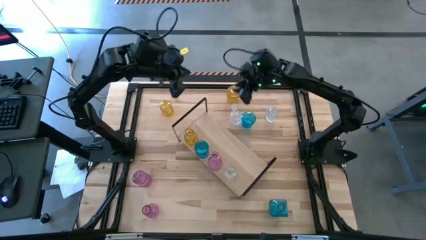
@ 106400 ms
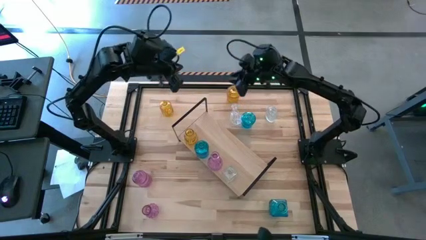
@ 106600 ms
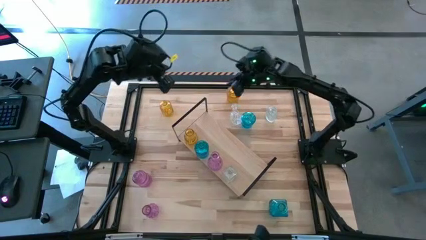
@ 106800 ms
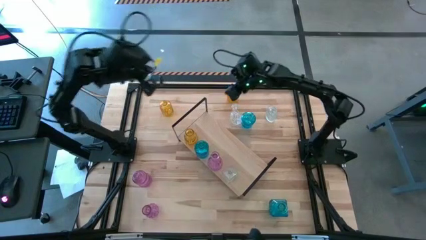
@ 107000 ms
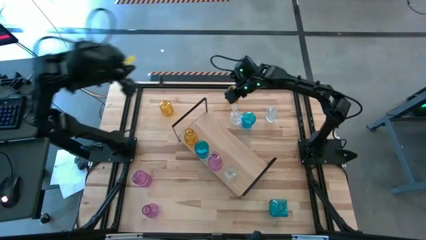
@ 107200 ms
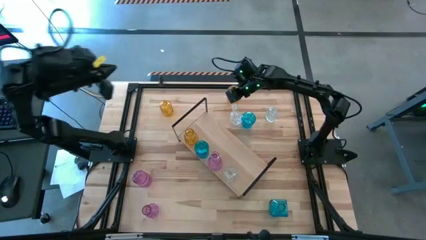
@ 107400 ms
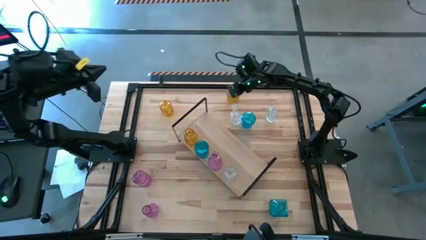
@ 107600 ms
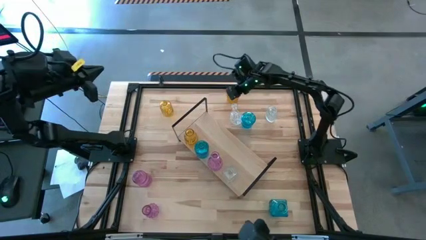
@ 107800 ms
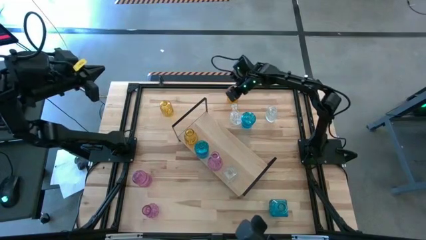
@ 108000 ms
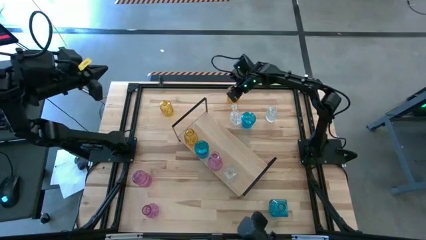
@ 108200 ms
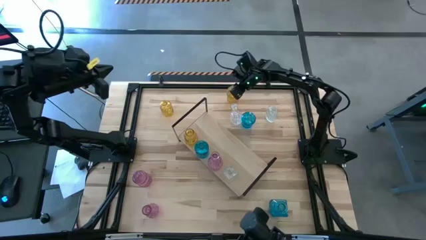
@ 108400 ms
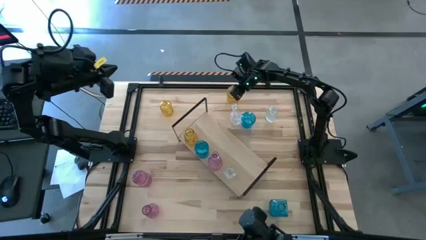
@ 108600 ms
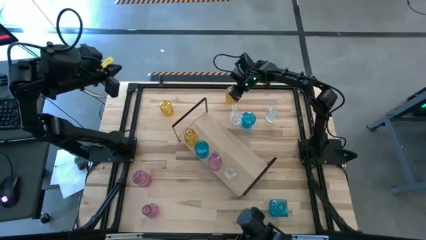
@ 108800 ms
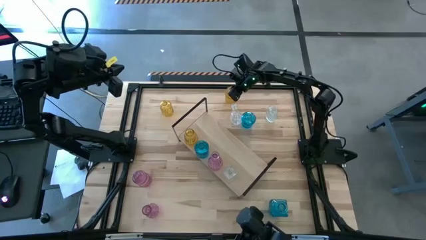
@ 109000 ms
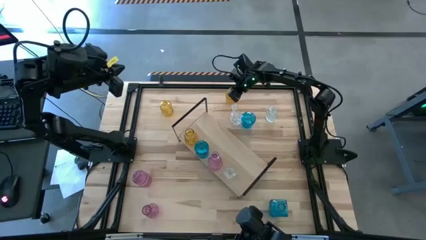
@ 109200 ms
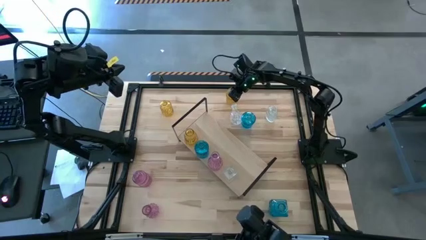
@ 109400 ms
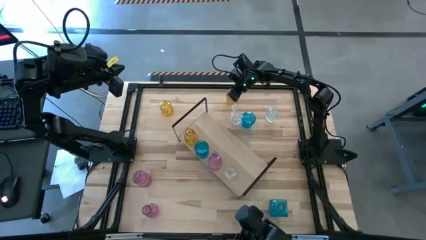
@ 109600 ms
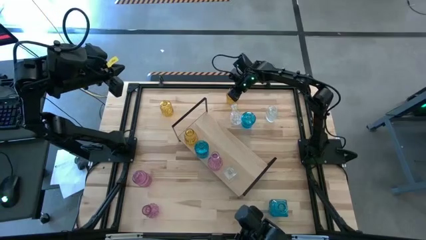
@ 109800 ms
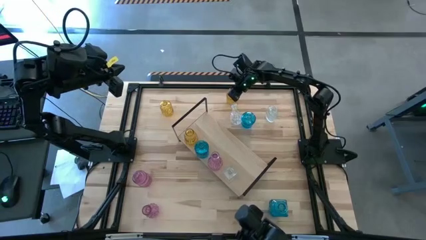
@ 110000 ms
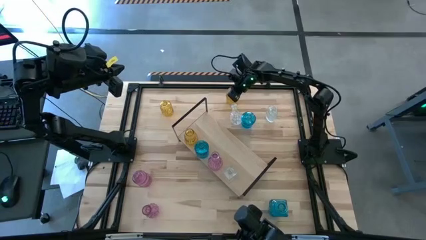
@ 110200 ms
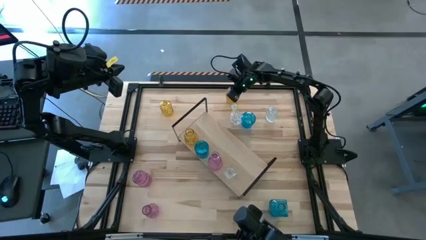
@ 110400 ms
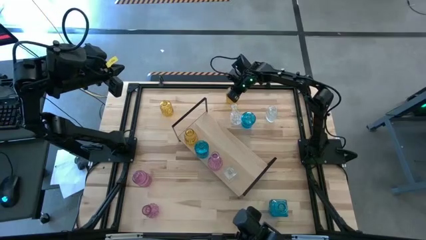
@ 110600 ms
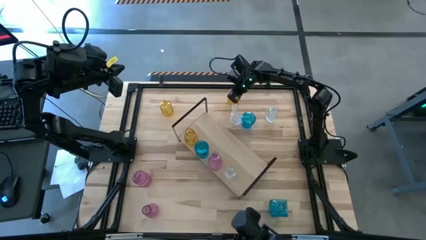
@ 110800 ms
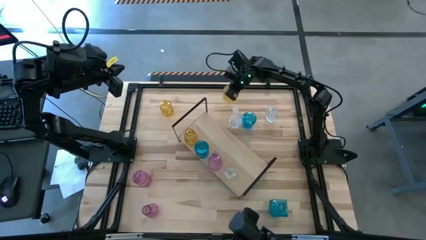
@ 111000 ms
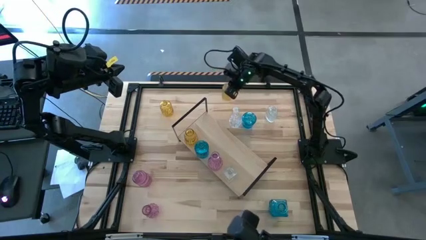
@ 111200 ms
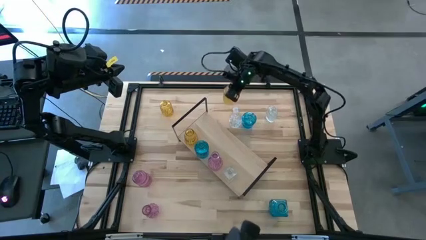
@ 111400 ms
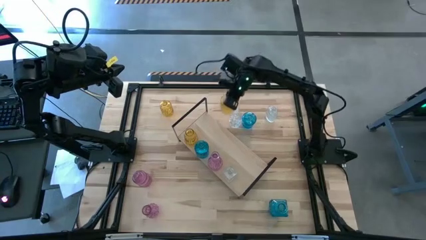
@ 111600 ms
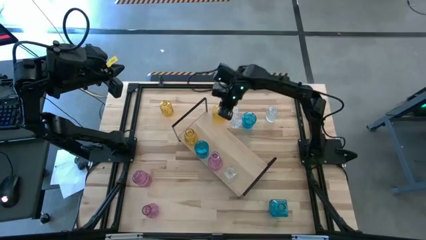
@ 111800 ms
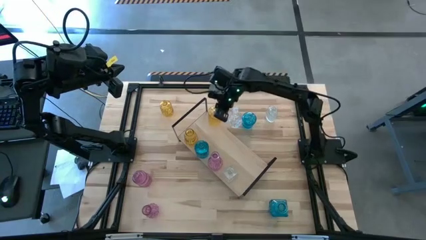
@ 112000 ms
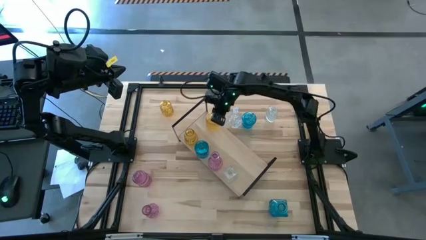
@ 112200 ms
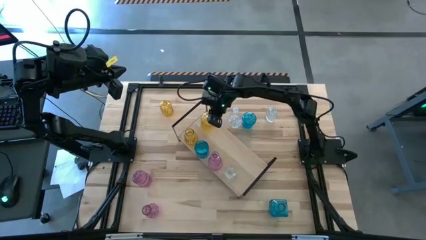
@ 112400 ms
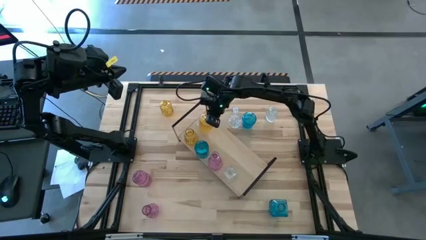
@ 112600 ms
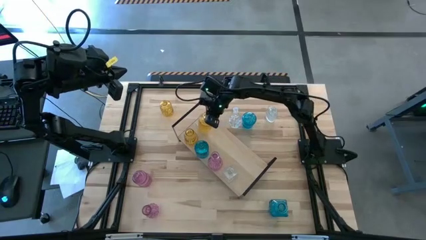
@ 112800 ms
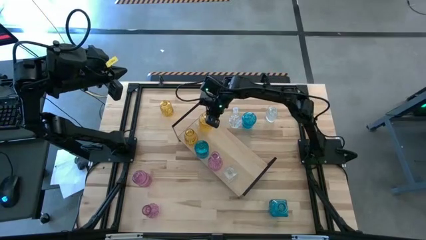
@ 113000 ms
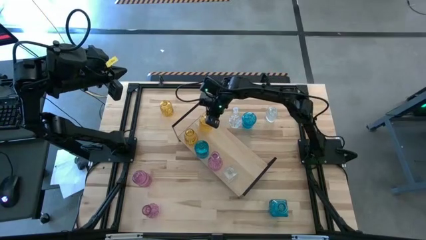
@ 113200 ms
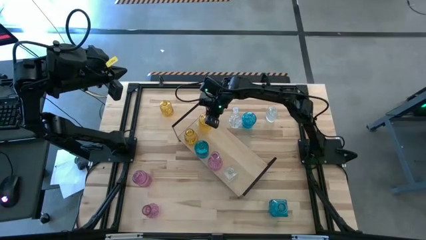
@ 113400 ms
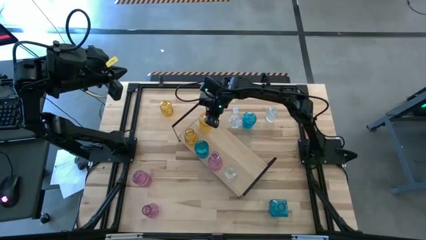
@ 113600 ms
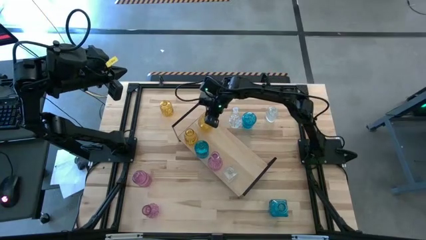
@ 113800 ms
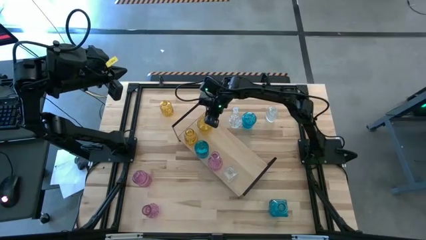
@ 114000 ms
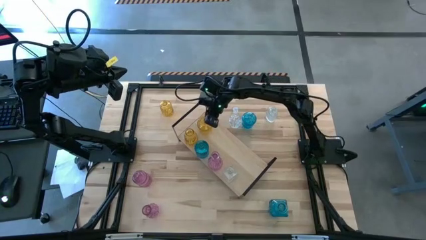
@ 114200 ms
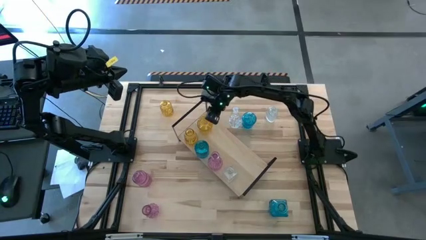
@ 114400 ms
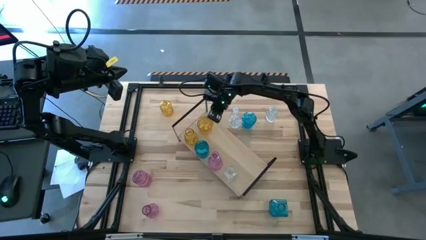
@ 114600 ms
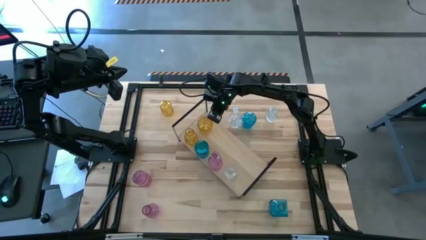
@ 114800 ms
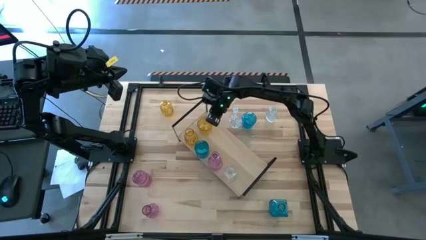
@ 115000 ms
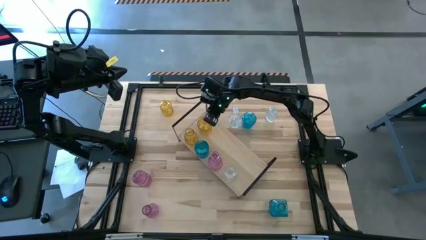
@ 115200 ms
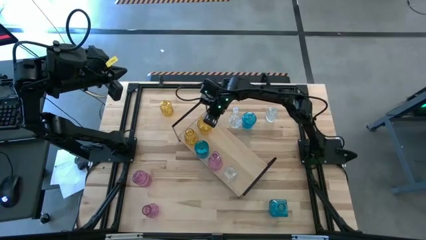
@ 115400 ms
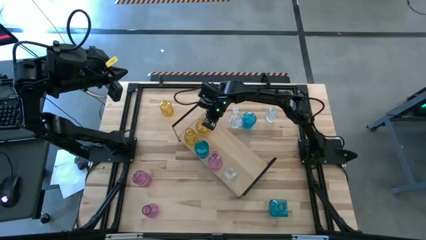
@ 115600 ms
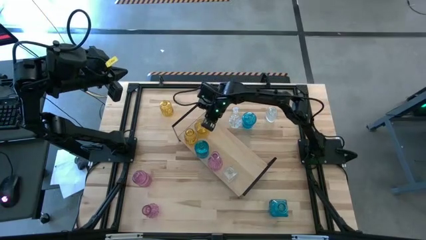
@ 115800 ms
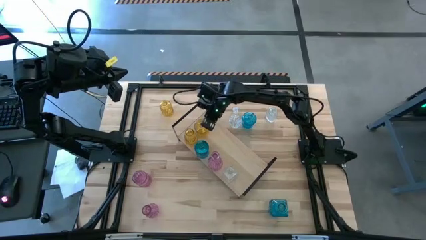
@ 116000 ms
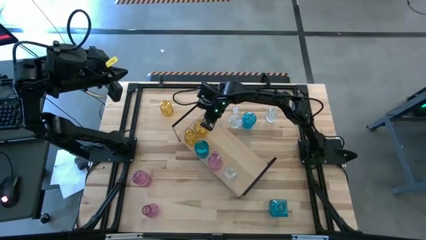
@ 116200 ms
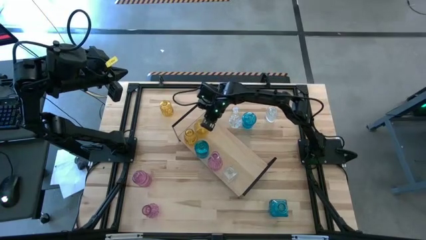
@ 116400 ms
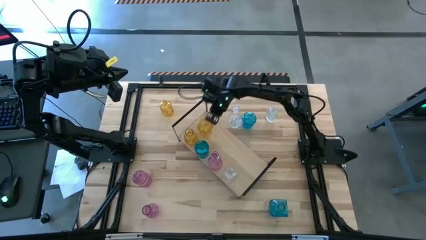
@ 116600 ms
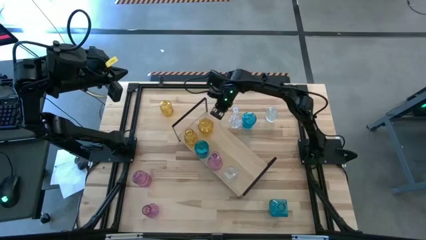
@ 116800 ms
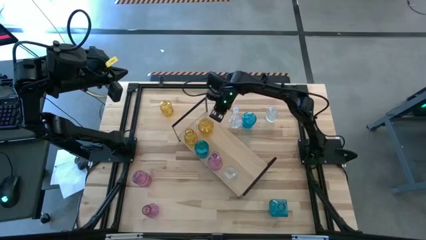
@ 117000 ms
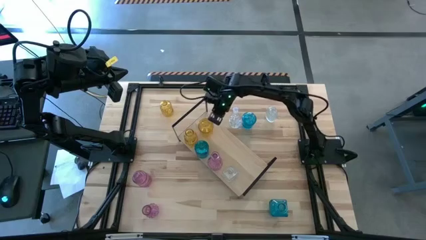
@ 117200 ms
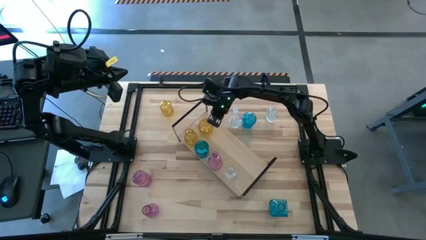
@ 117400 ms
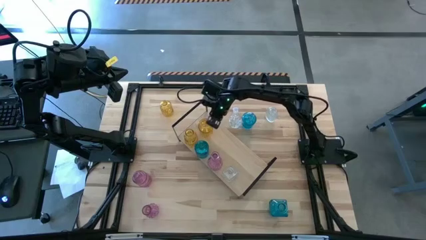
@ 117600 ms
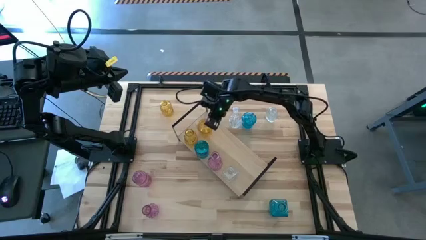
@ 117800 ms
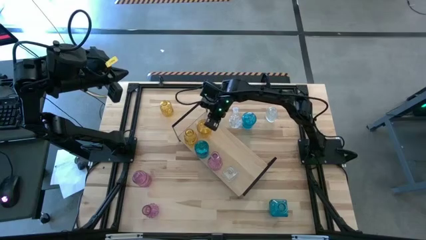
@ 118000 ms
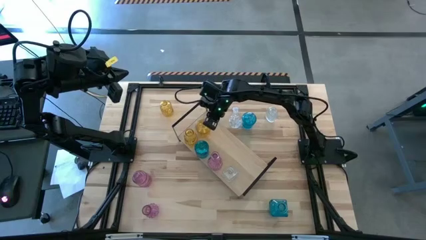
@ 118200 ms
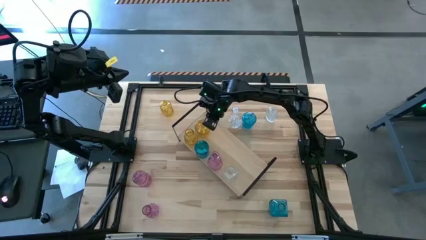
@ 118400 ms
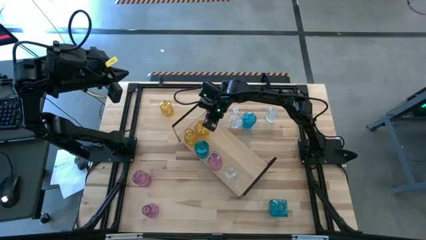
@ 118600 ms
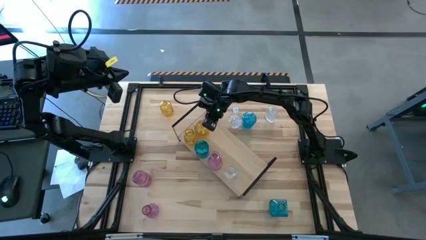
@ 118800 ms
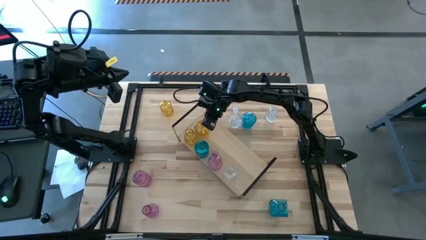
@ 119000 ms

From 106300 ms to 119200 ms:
Task: sort vases onto shelf
Put the right yellow crystal vase on the shelf
